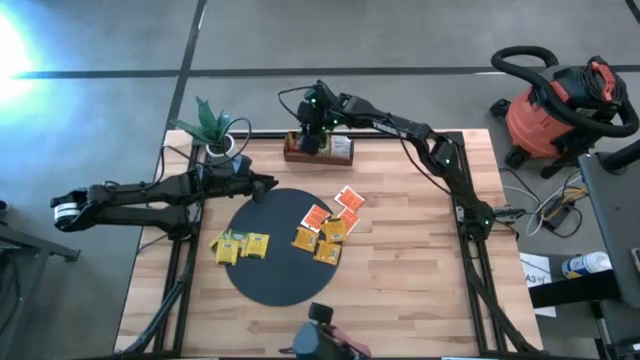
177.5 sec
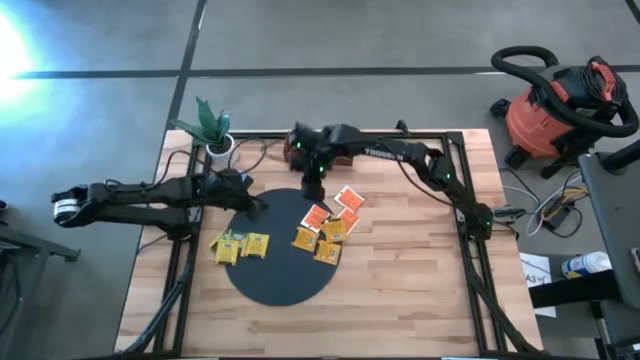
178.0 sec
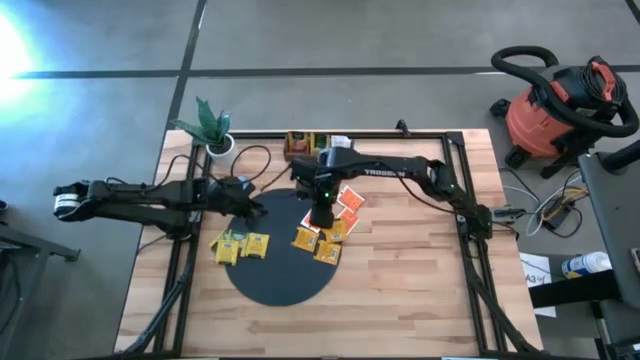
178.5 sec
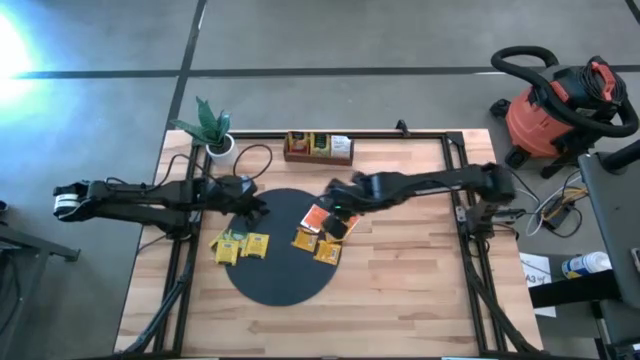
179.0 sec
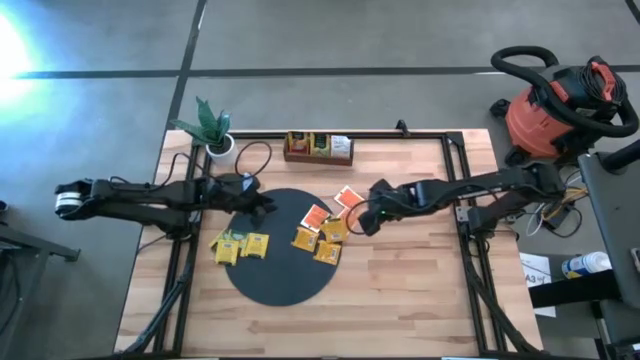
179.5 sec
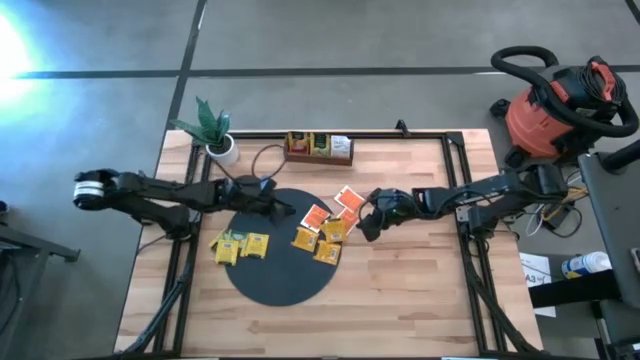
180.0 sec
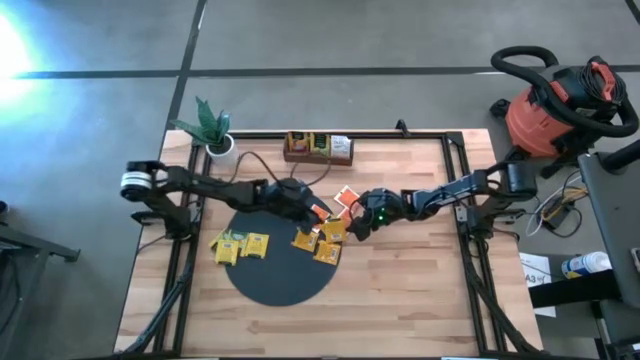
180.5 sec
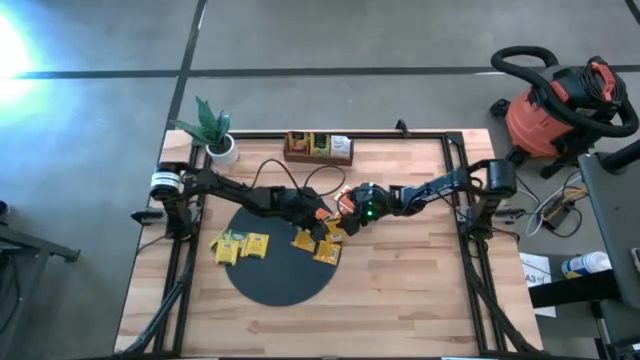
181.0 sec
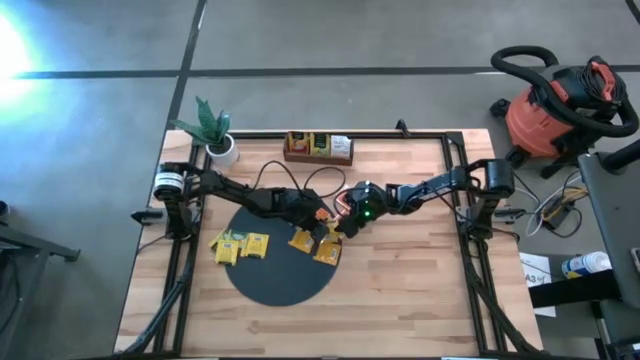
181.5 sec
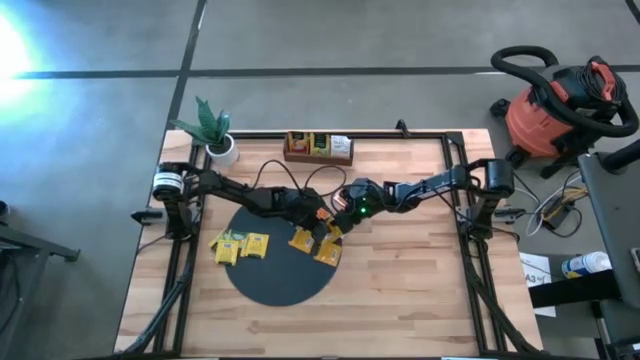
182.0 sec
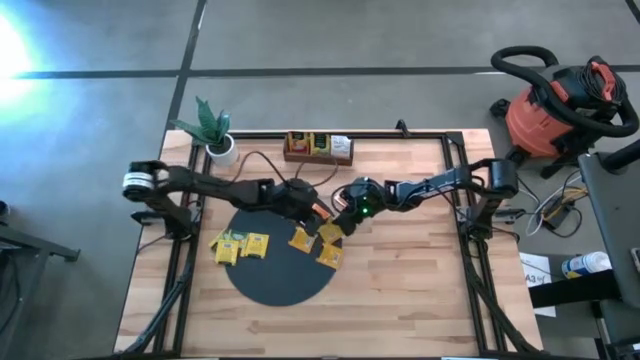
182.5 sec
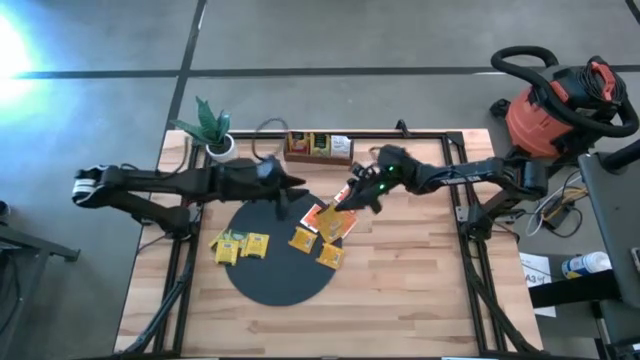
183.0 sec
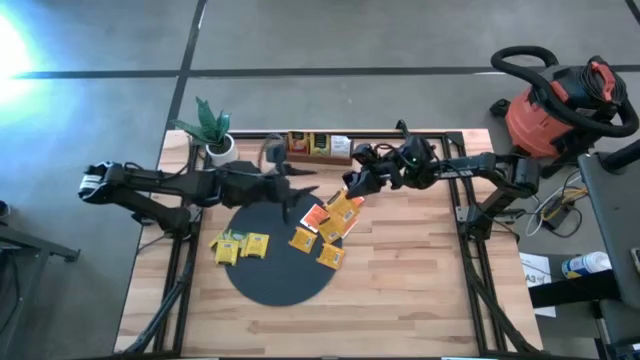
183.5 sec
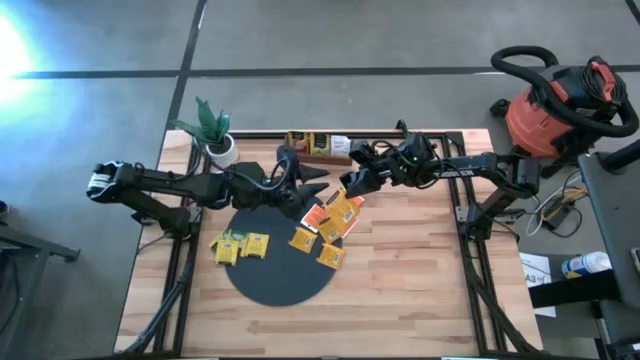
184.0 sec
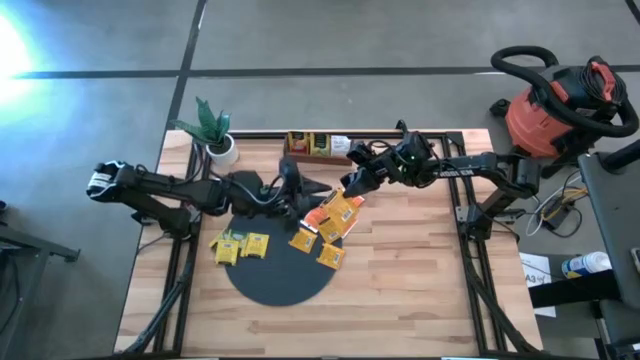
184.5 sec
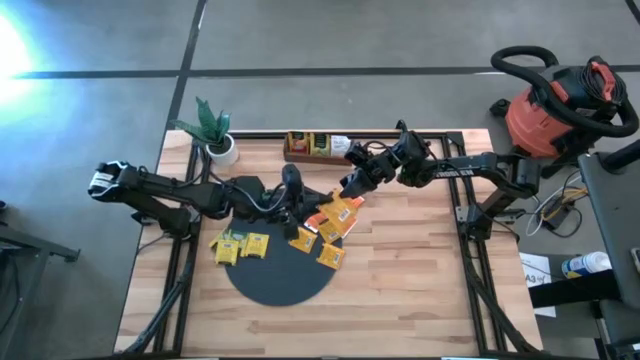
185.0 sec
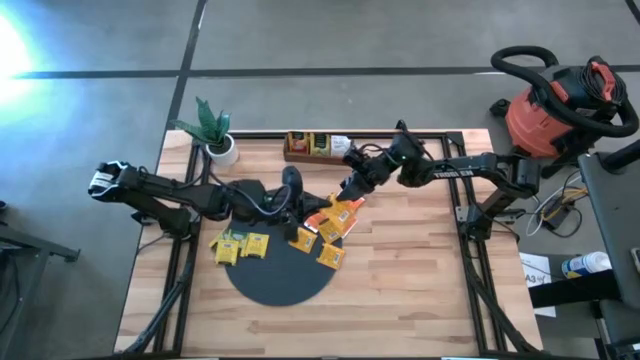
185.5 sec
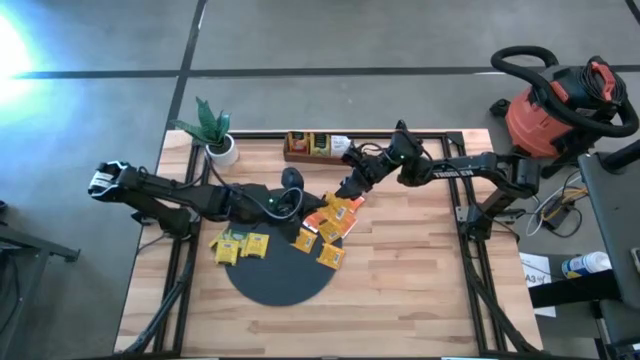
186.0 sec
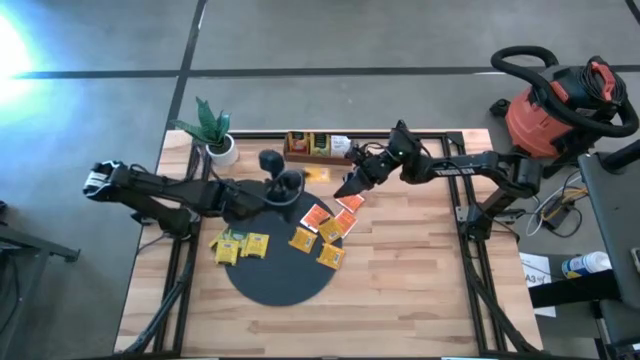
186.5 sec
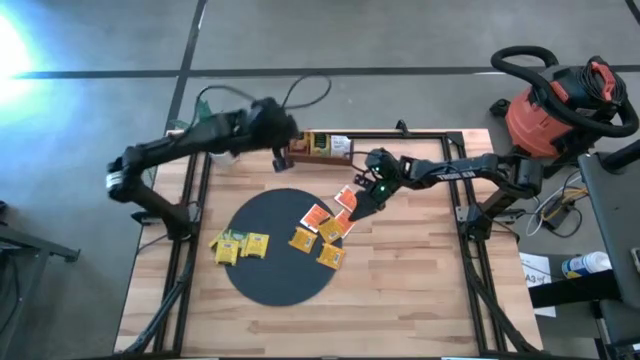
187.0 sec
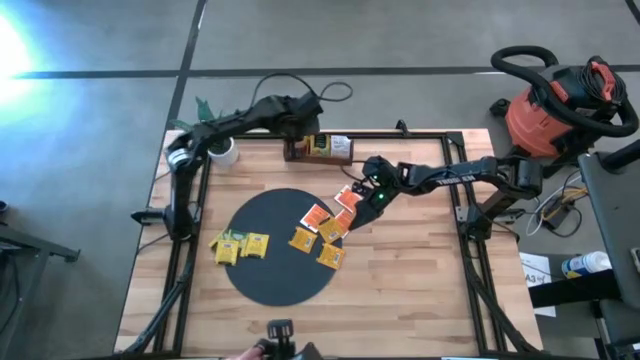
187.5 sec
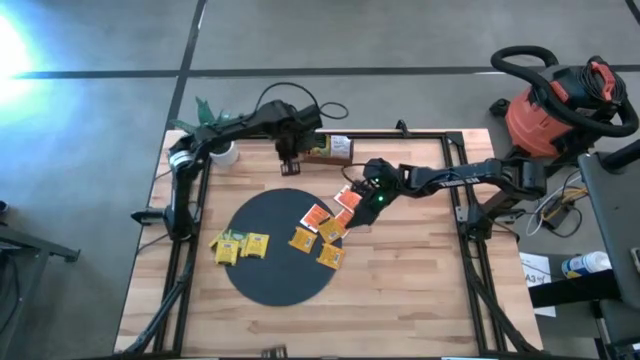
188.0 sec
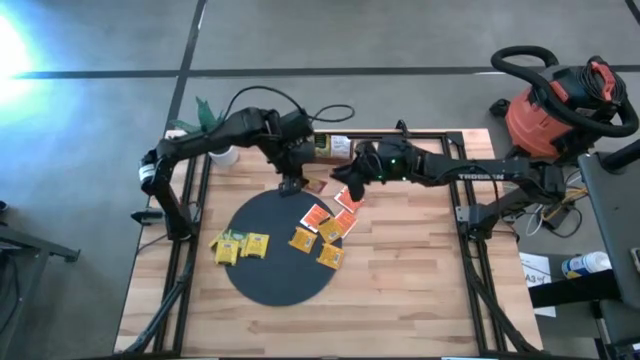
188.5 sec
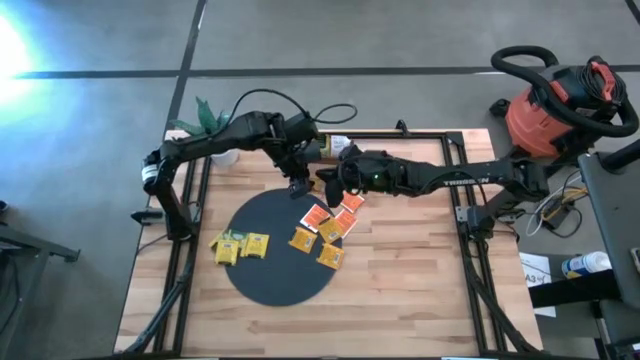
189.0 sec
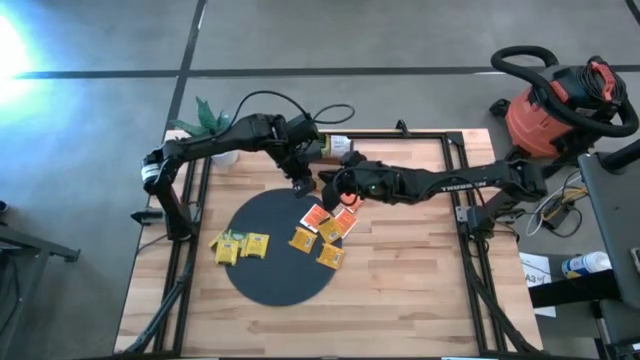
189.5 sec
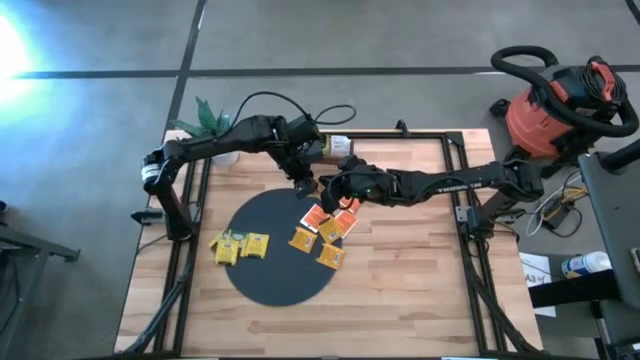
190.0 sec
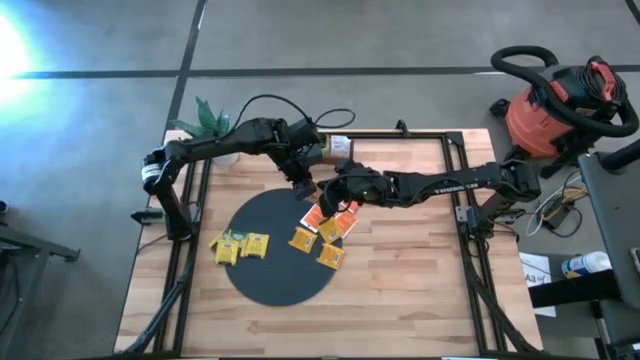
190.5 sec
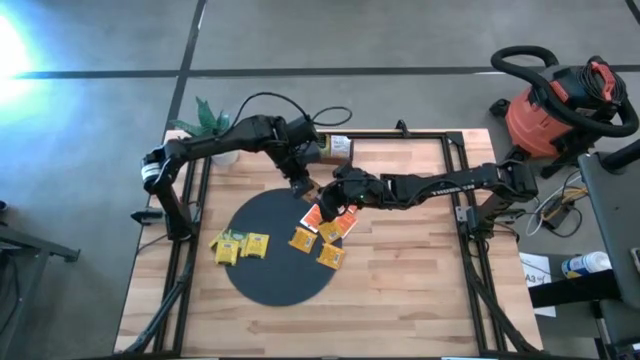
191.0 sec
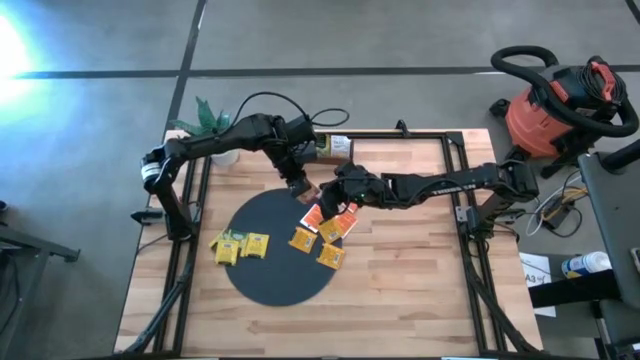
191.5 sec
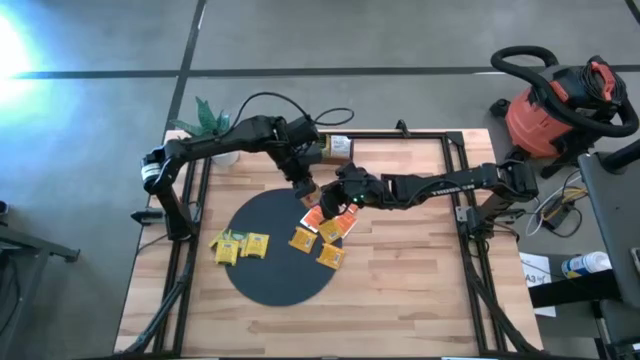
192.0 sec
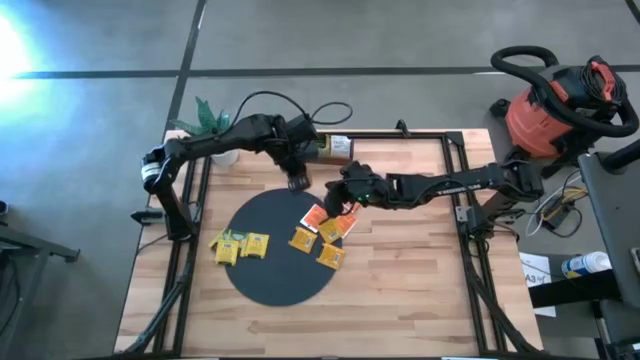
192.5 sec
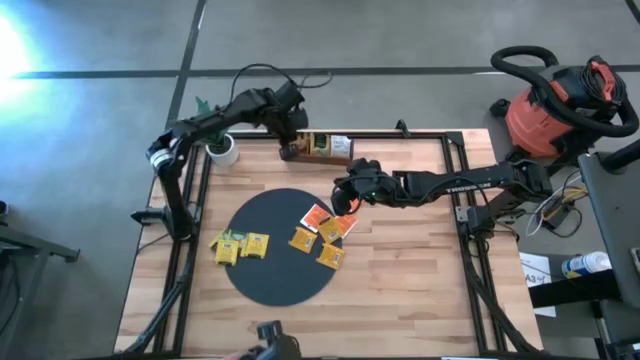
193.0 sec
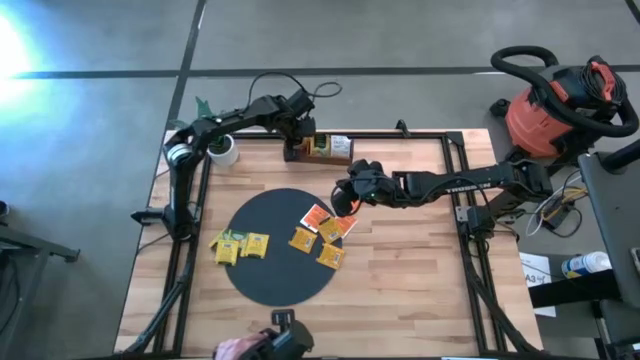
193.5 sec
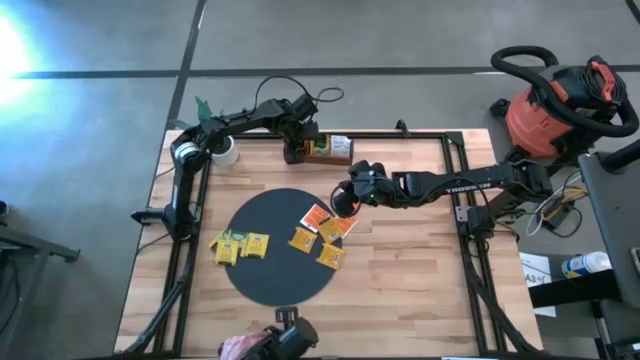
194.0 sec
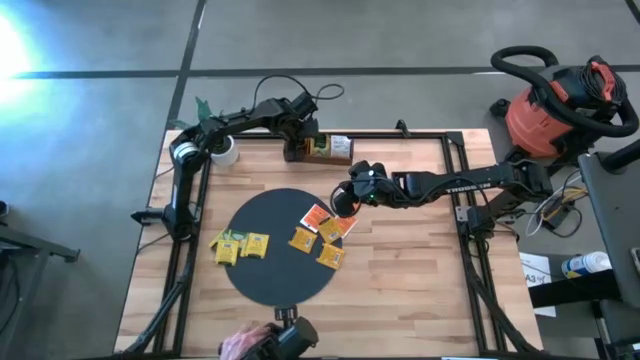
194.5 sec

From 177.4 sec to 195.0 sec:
Task: Pick & Place Tea
Put the orange tea bag into the left section of the wooden organizer

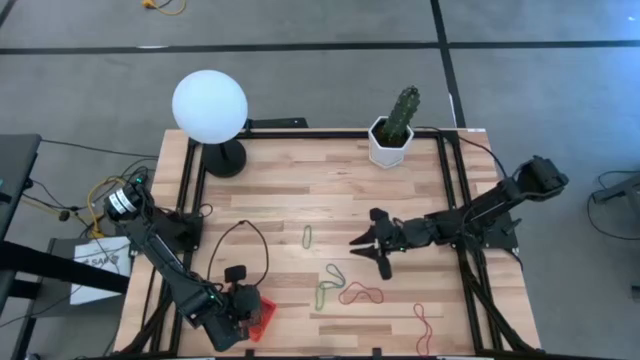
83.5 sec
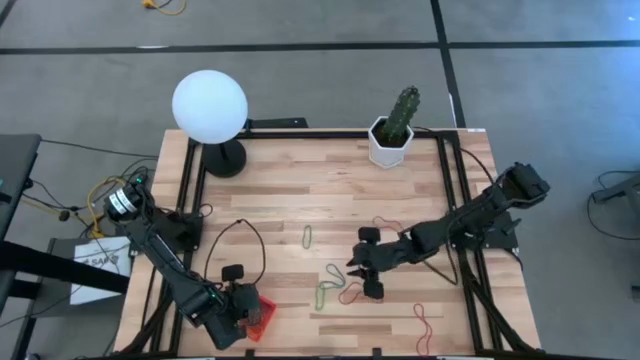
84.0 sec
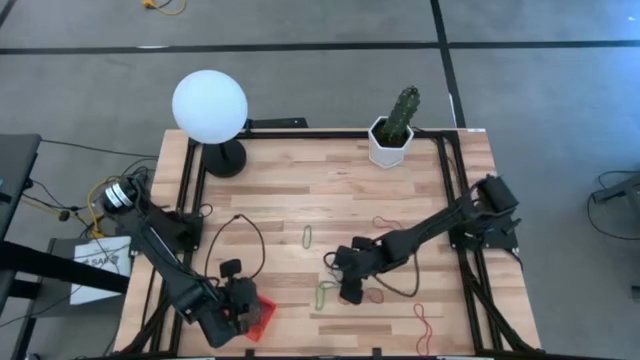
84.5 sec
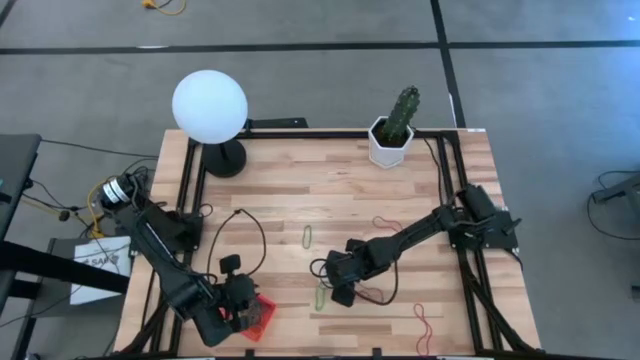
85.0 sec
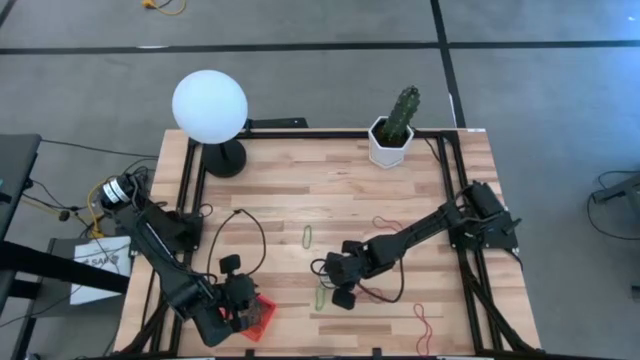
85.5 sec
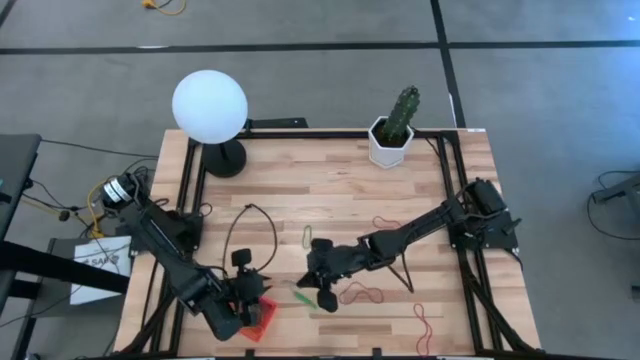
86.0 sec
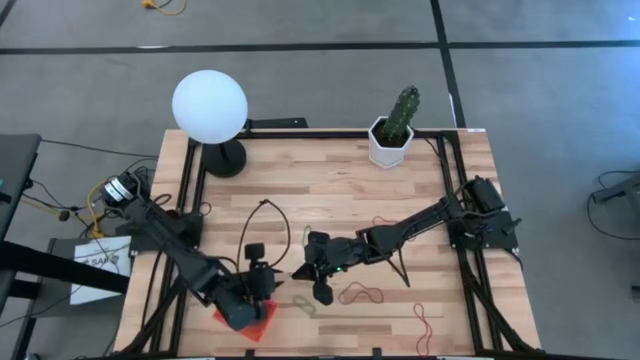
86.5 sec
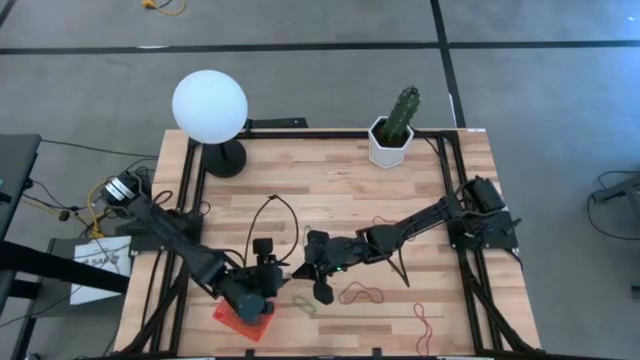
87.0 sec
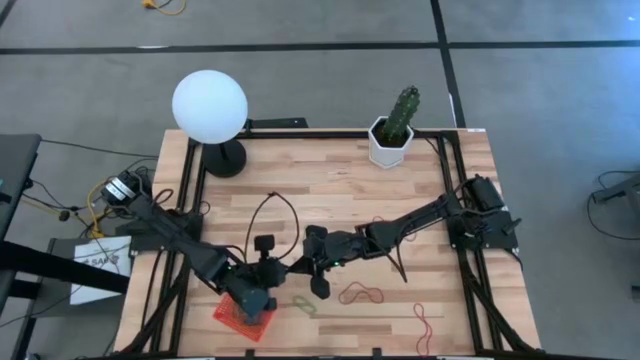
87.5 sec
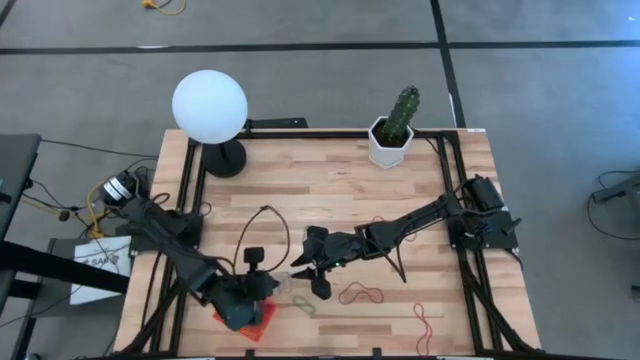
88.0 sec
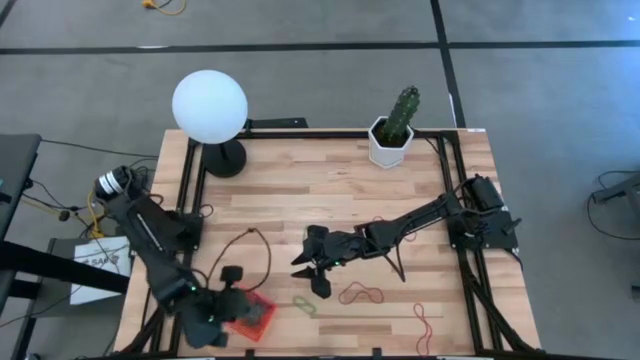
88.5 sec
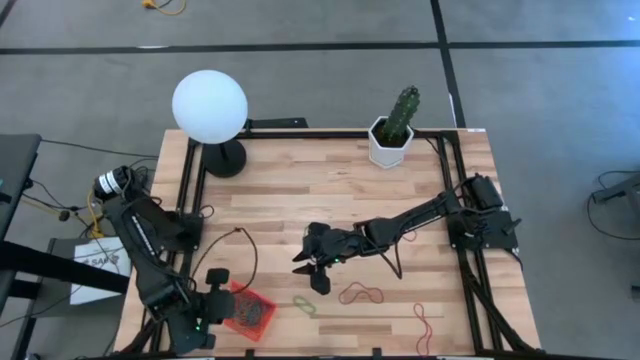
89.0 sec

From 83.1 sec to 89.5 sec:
Task: Pick and place rubber bands into bin
Put the blue rubber band into the basket
